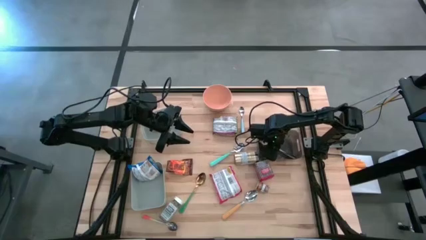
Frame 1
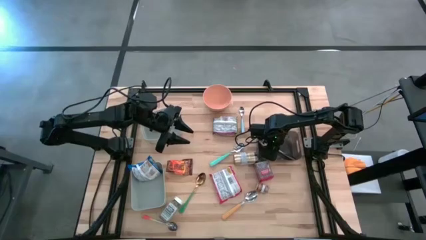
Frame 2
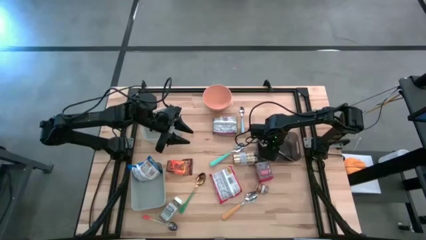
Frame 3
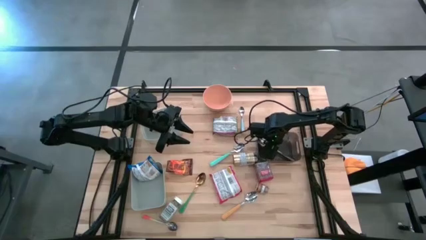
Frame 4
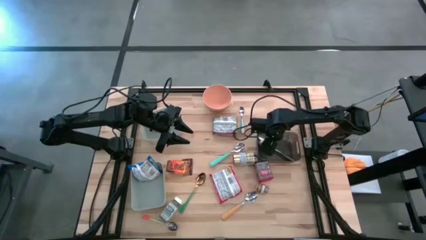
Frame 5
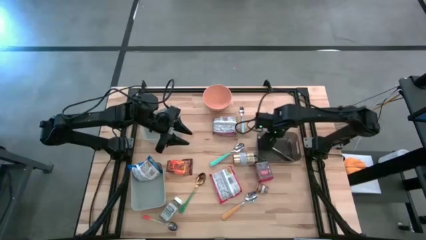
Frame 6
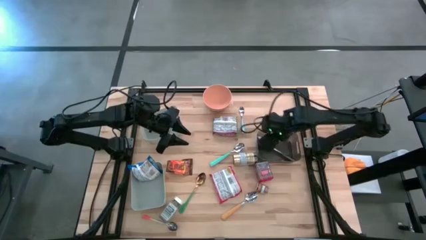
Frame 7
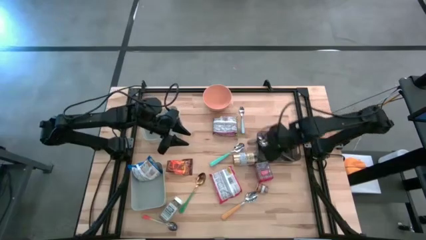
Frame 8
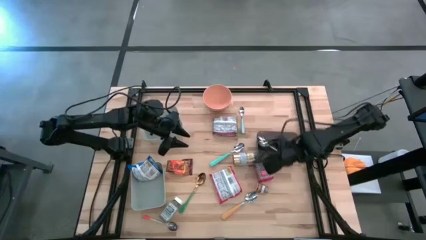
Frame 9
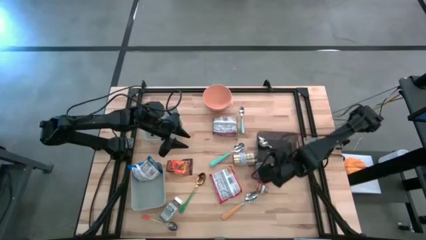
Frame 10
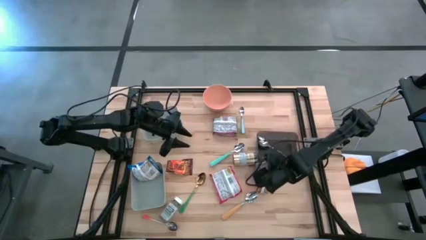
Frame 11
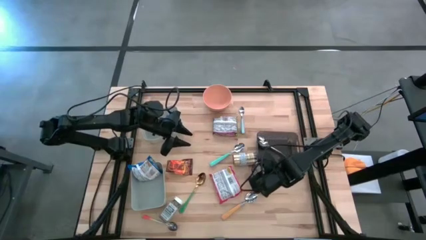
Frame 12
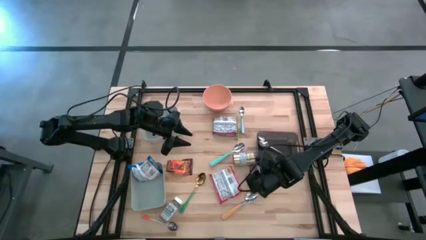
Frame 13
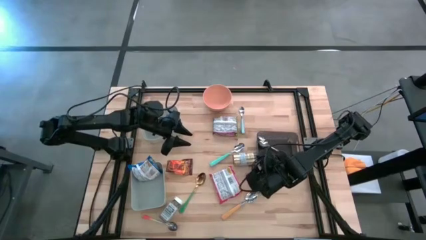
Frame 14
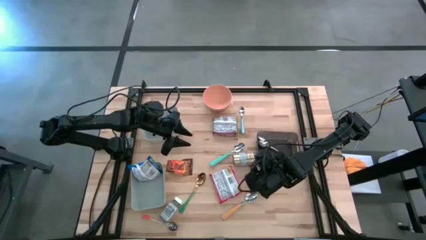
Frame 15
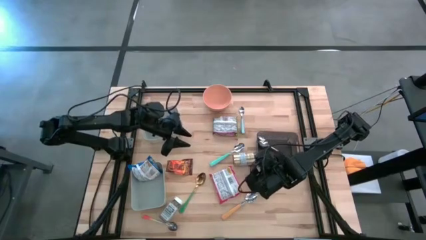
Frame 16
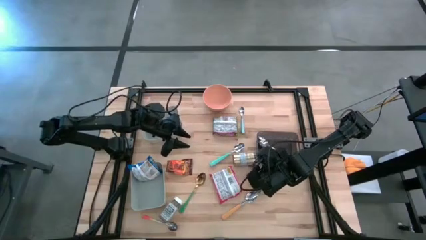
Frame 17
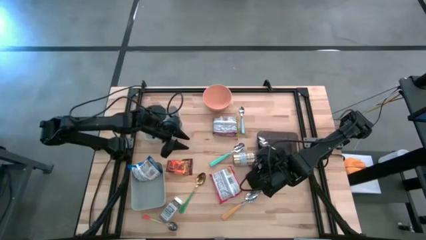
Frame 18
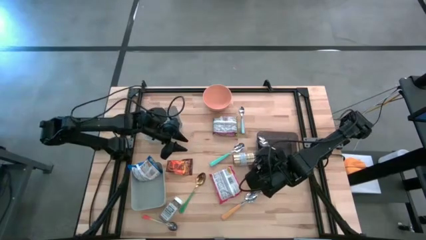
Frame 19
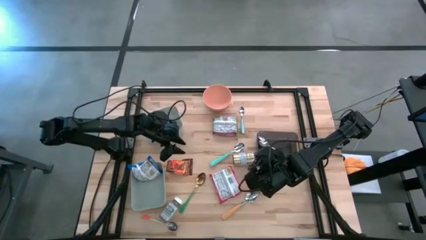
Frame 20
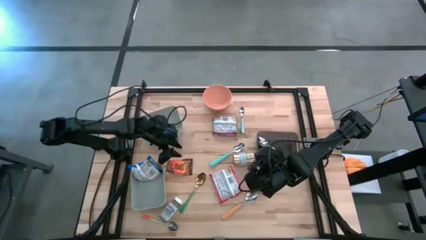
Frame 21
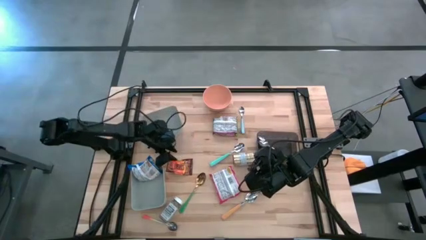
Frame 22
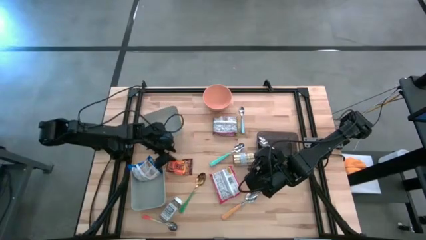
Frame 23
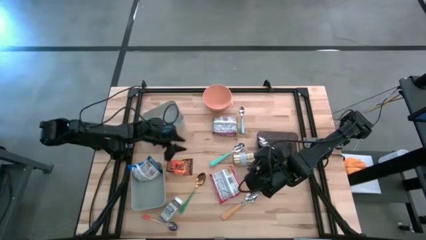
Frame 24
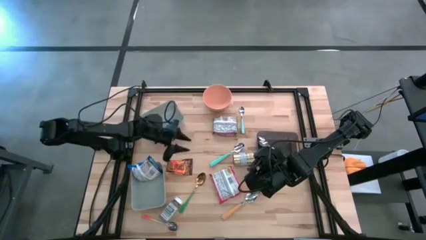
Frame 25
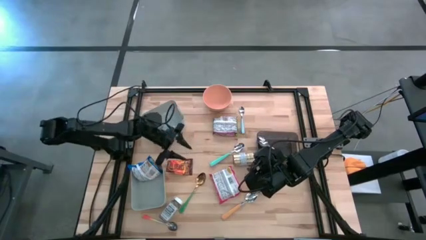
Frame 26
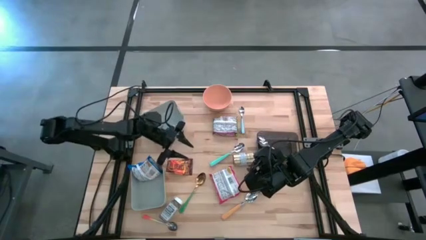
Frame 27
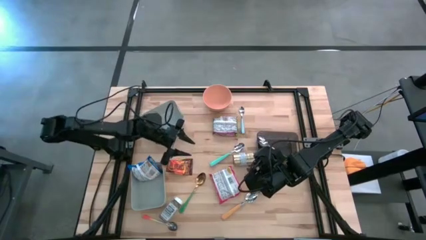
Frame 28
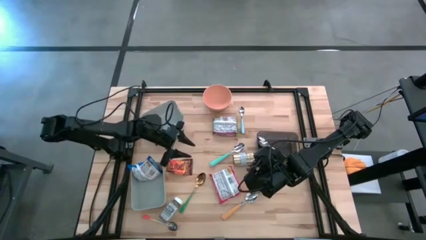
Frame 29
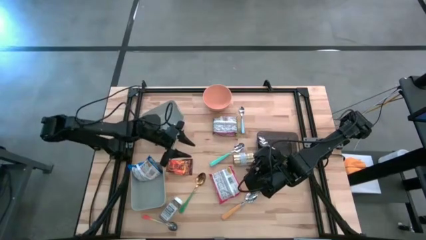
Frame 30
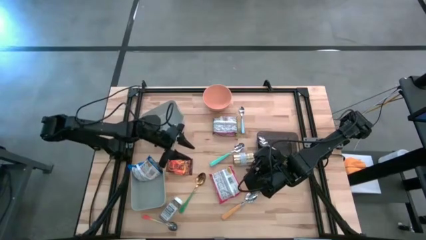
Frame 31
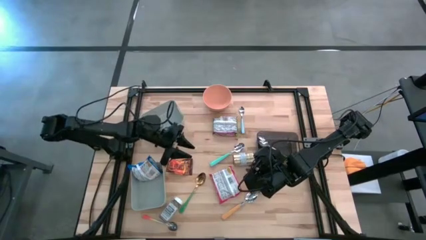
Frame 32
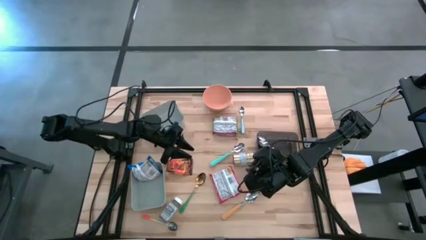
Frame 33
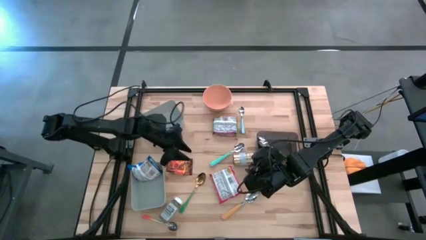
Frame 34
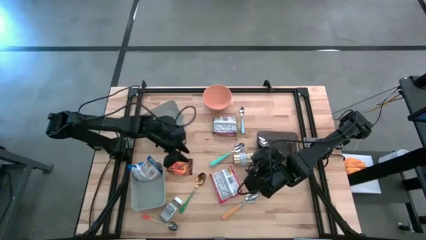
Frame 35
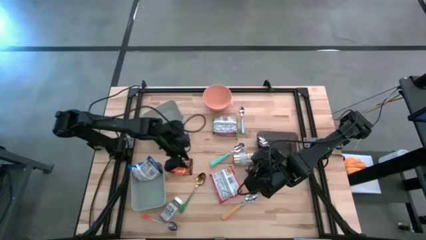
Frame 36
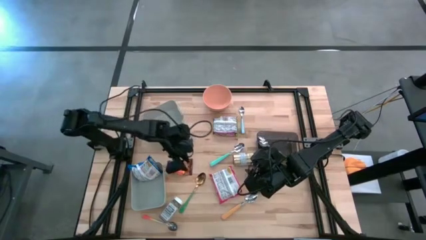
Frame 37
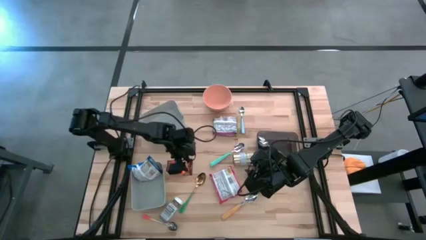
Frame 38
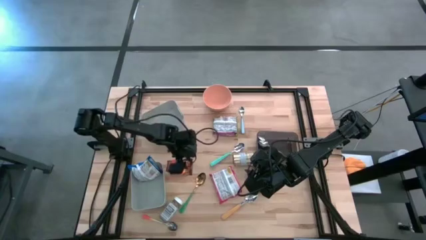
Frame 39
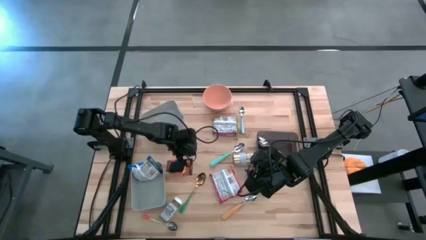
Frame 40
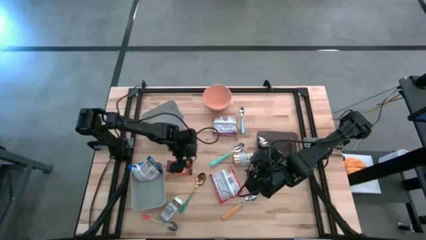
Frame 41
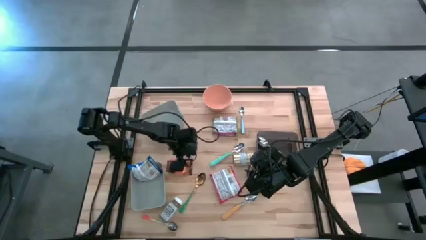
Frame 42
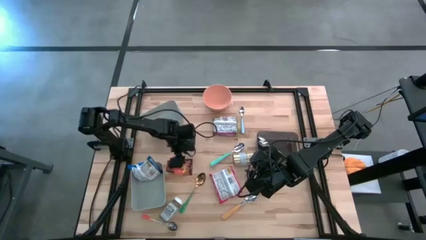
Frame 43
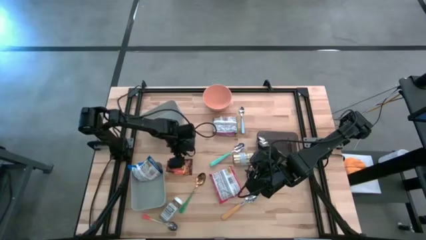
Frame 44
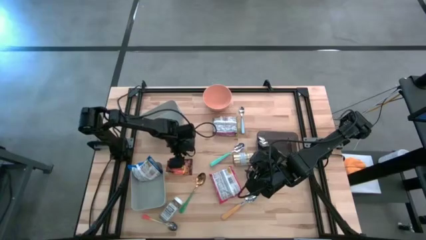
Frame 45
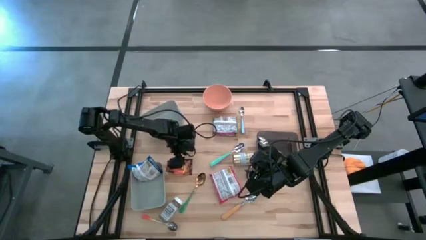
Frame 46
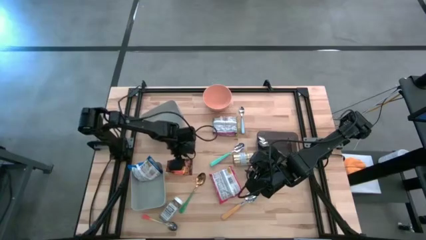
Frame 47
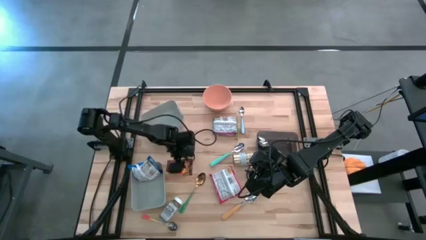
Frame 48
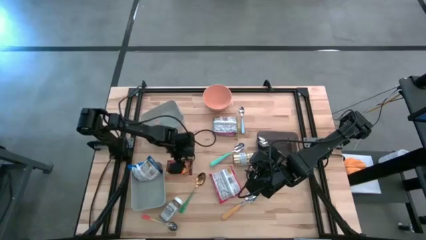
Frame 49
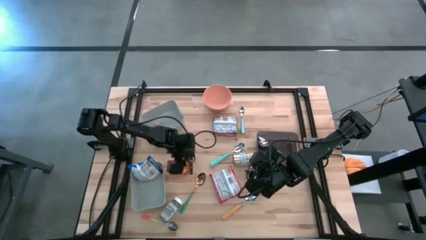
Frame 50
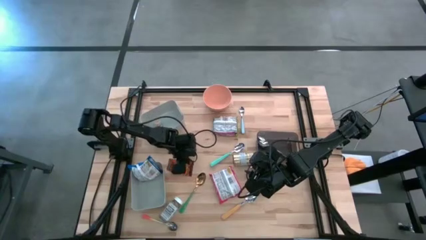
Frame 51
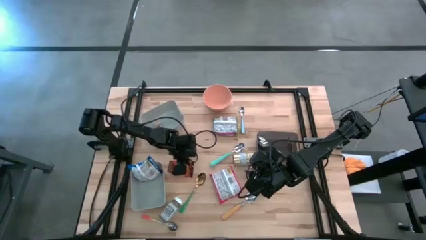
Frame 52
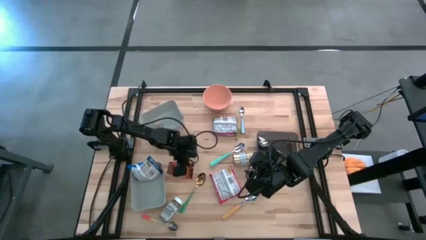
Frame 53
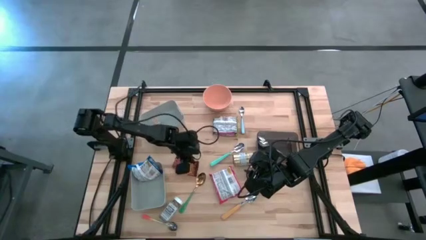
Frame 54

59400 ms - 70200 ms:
Put the orange seasoning pack into the top gray bin

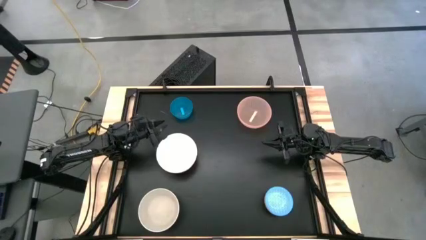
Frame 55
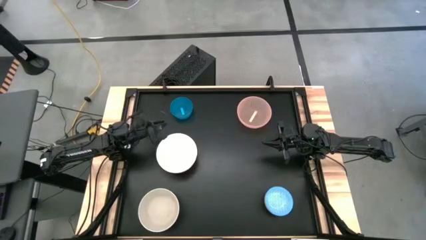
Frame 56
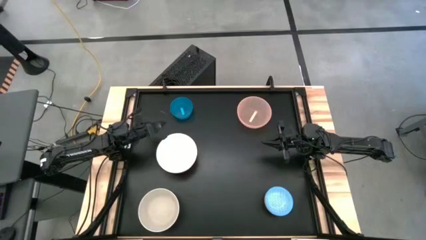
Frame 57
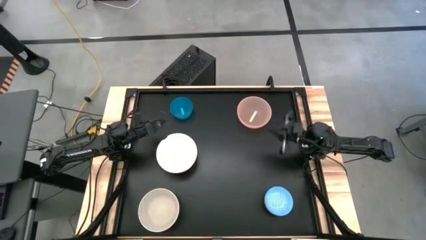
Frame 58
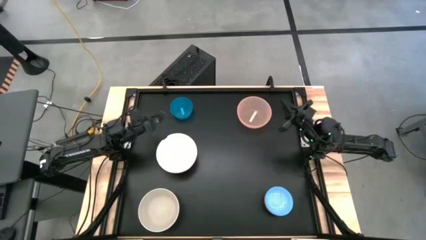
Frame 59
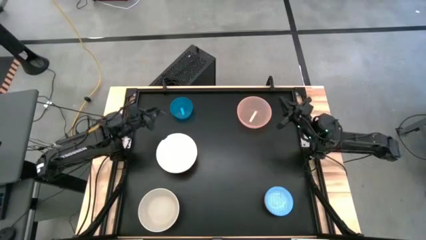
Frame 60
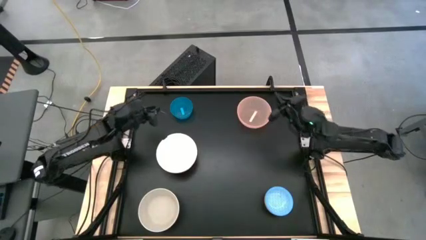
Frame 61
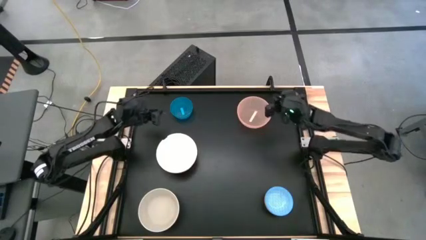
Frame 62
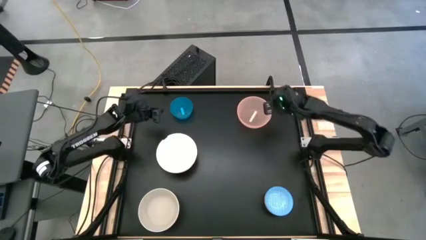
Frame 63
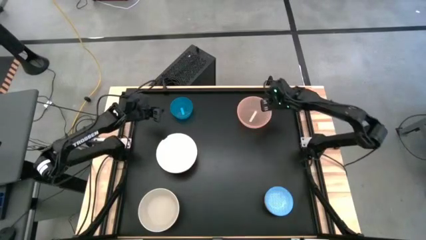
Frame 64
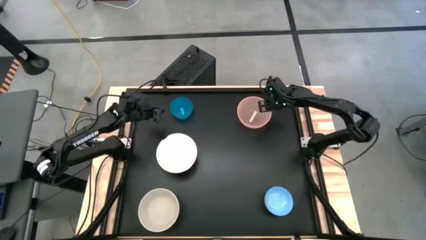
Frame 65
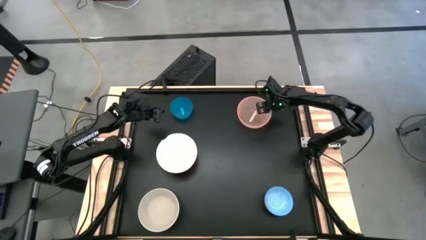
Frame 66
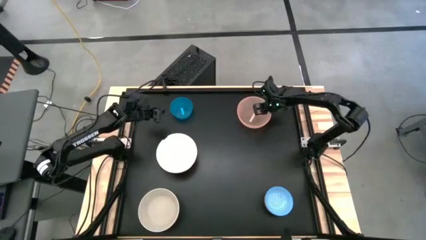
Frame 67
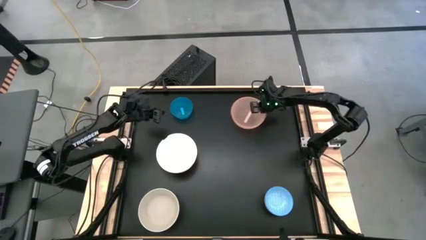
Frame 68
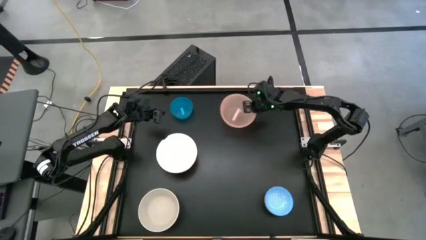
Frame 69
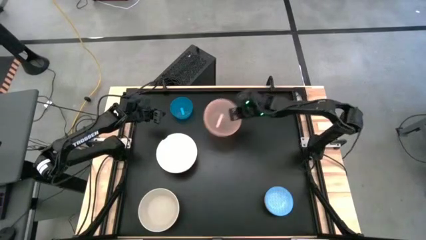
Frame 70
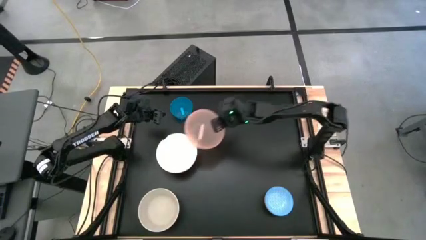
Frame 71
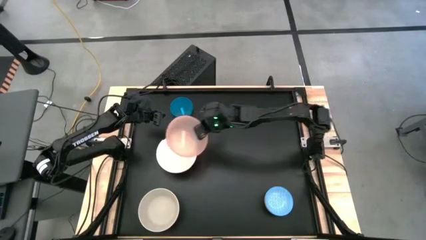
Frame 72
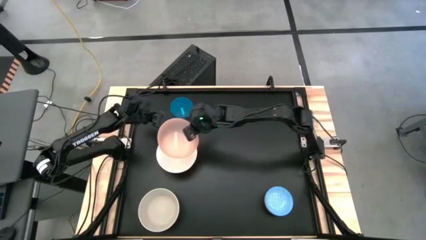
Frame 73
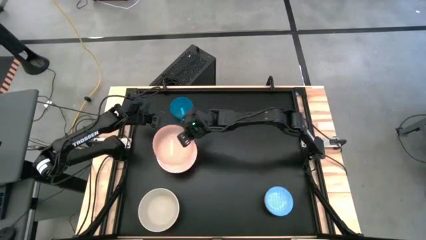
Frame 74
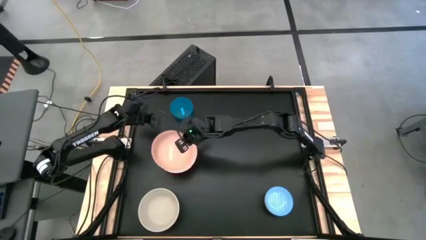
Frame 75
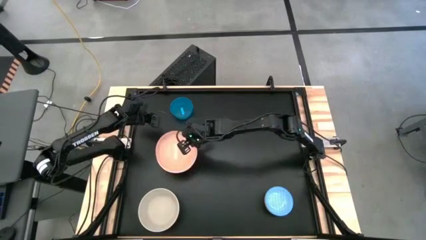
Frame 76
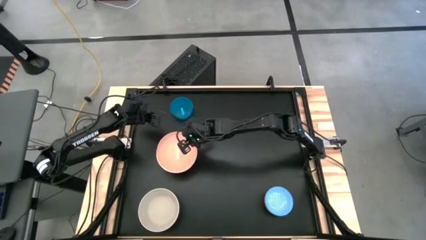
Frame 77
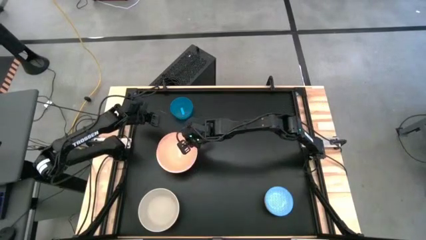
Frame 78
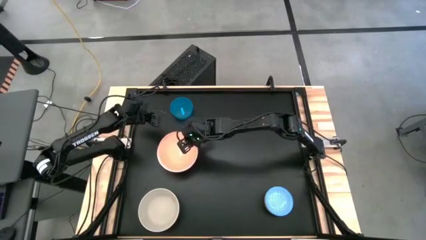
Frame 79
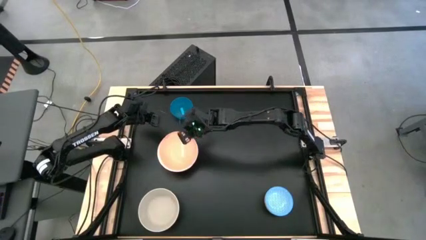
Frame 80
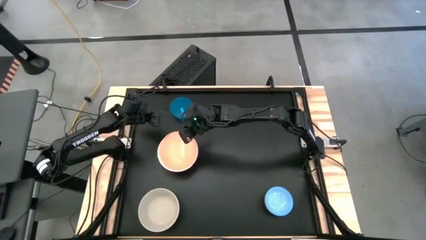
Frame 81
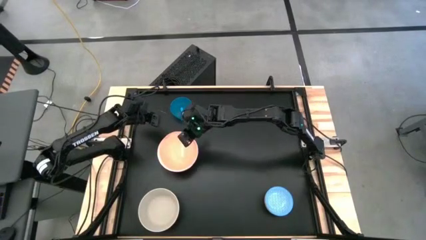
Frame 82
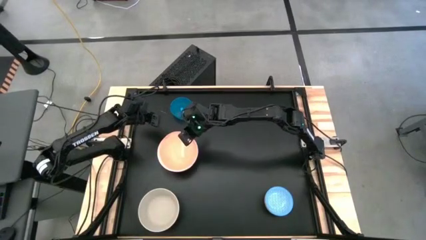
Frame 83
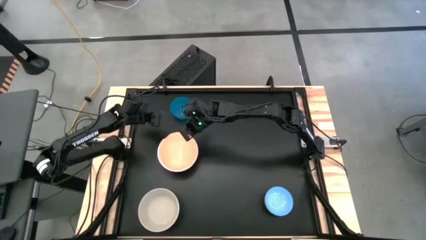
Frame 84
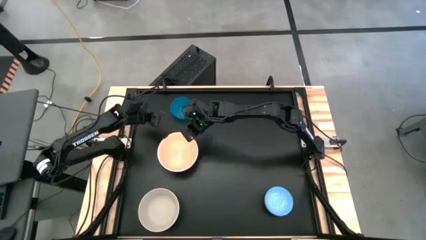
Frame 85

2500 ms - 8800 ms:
Stack the transparent pink bowl on top of the white bowl
